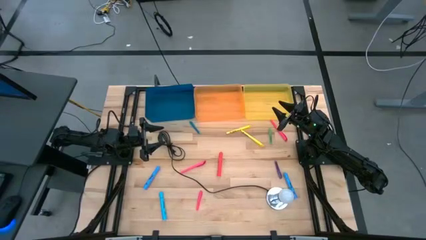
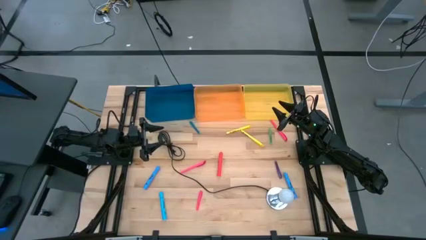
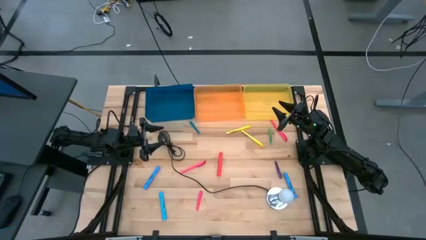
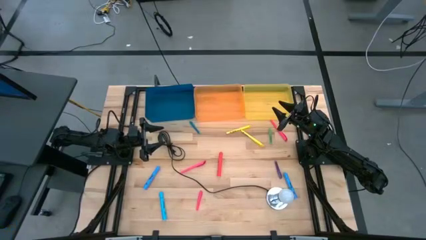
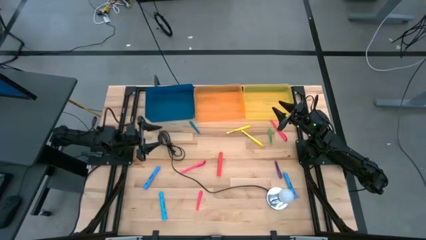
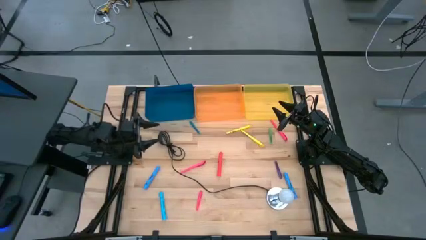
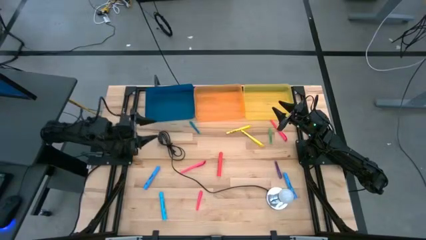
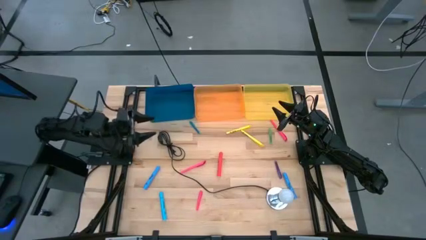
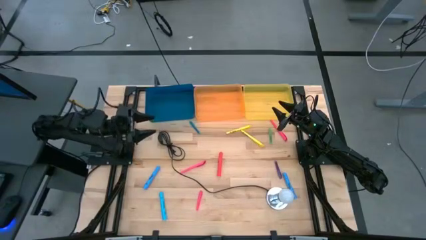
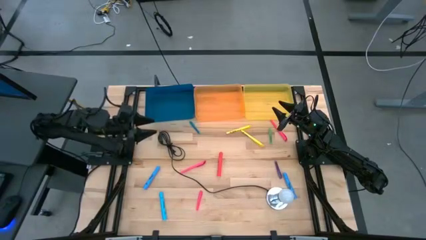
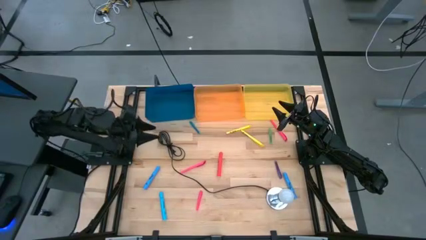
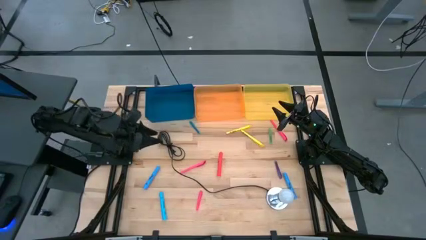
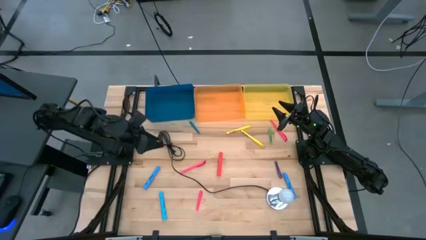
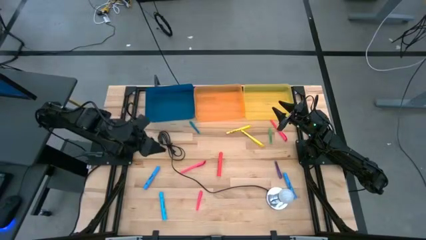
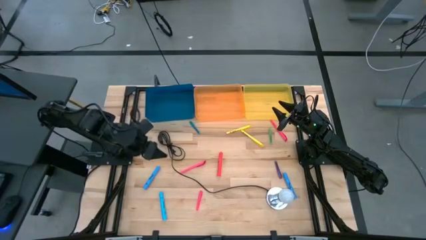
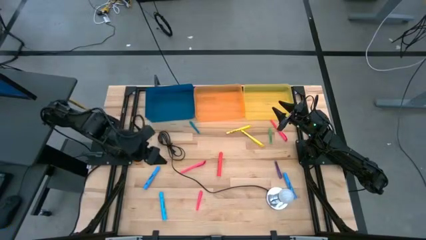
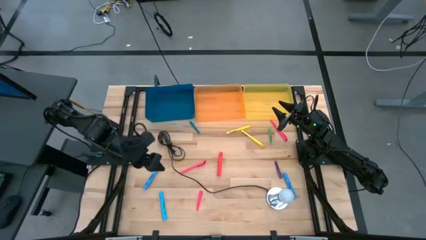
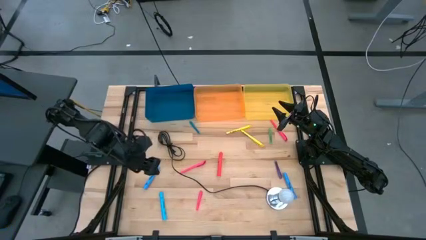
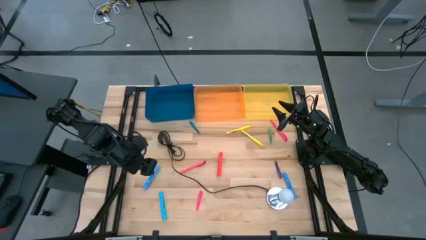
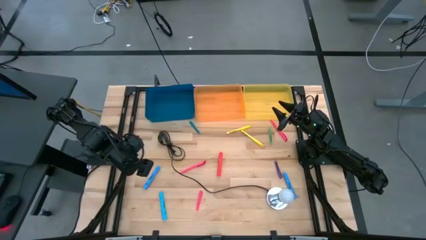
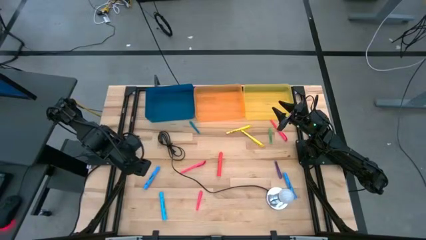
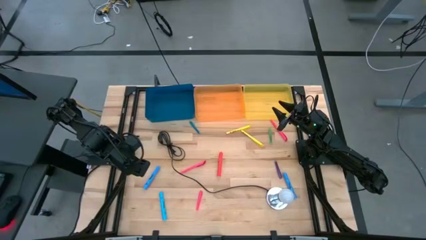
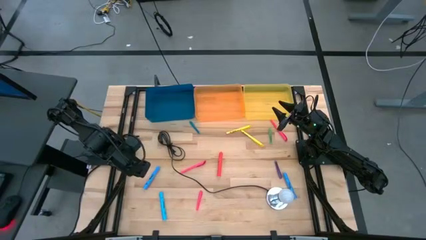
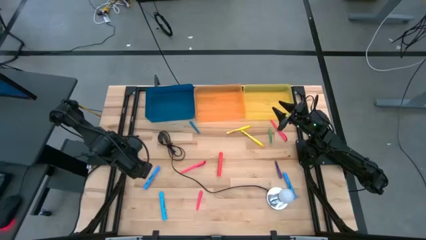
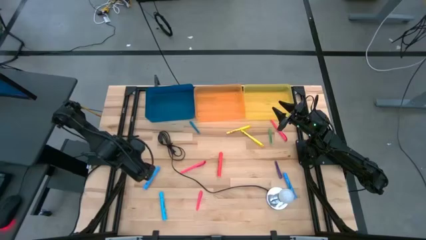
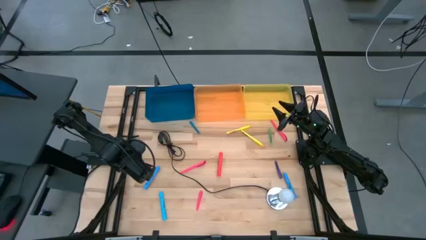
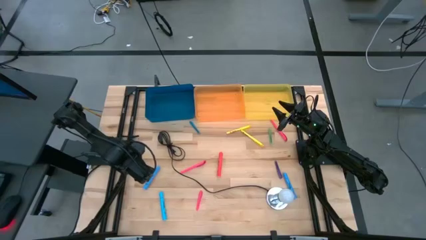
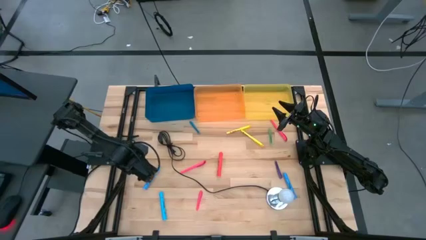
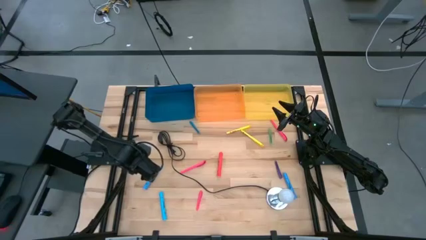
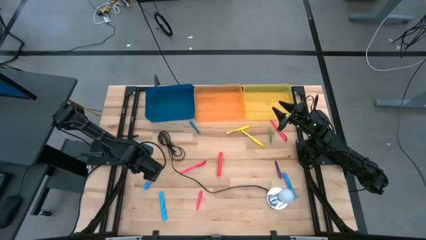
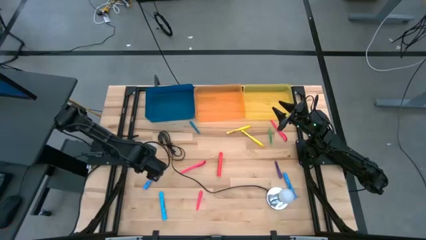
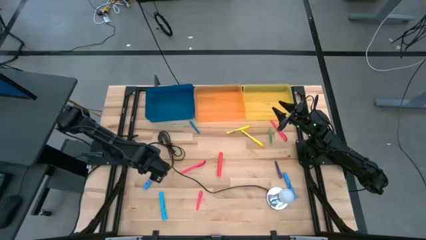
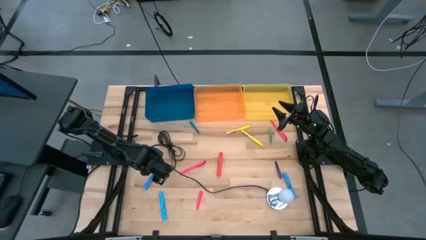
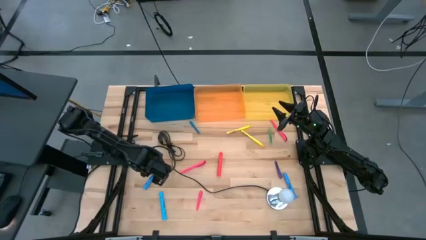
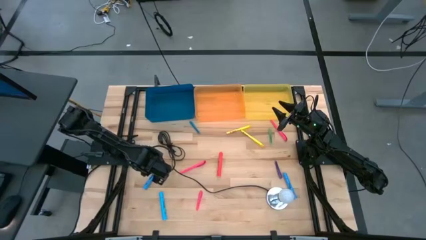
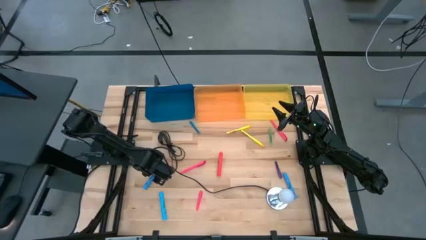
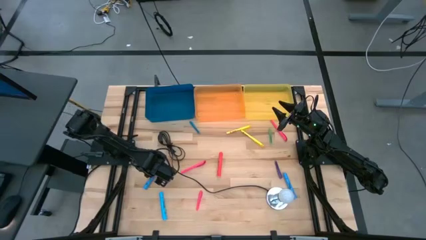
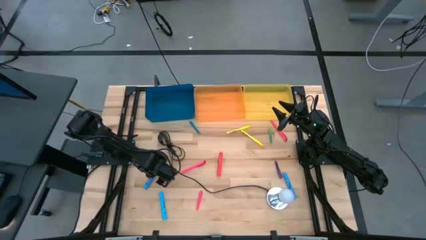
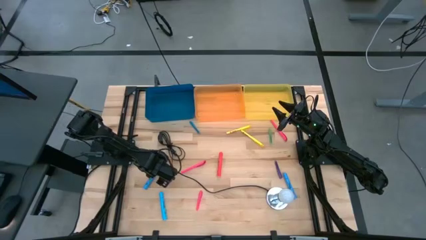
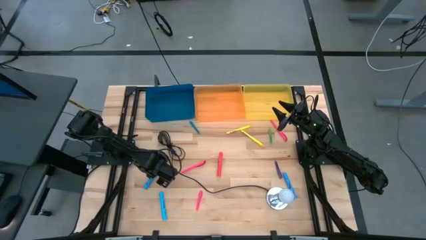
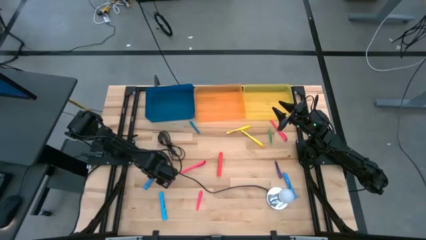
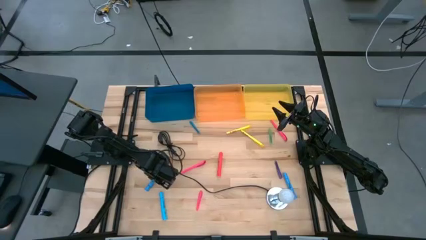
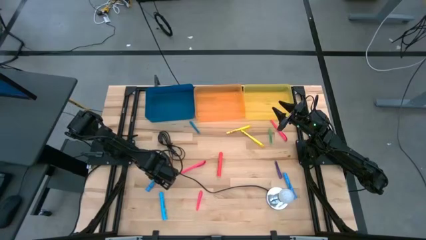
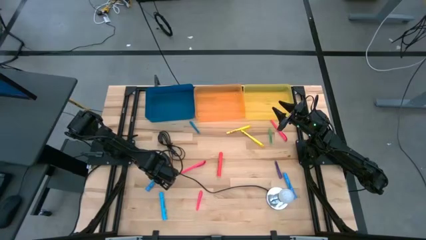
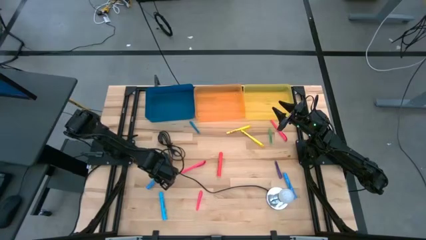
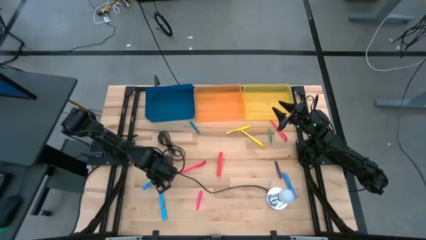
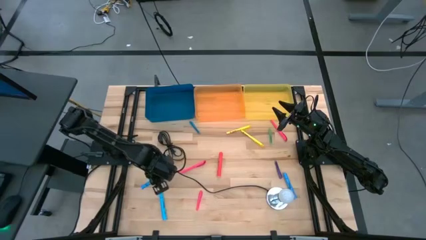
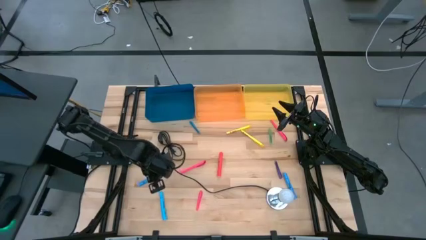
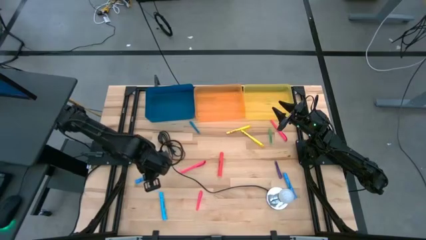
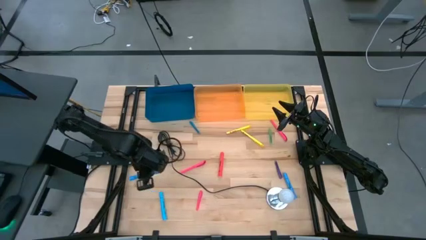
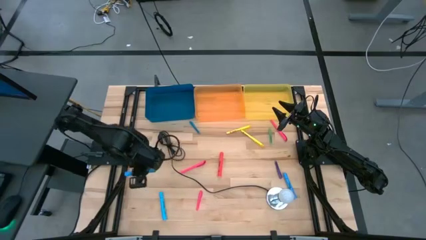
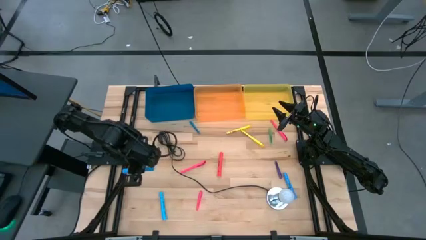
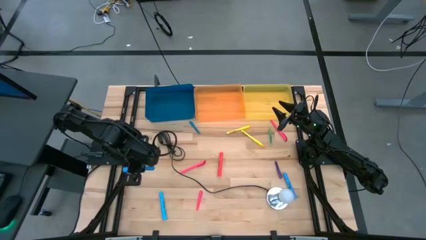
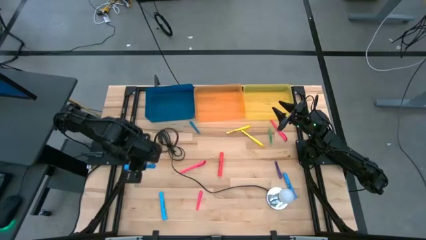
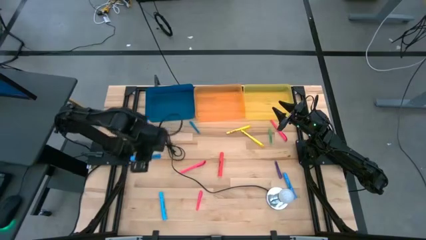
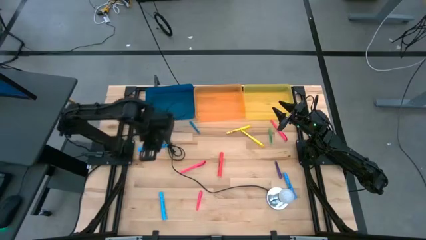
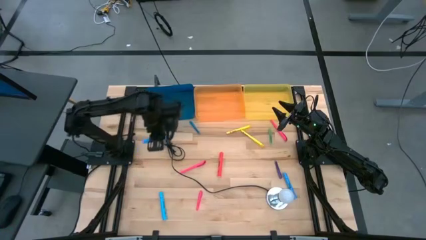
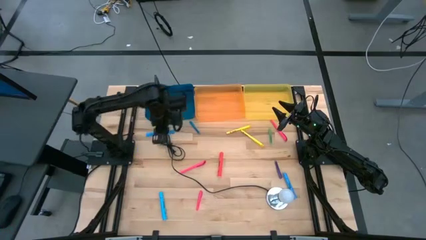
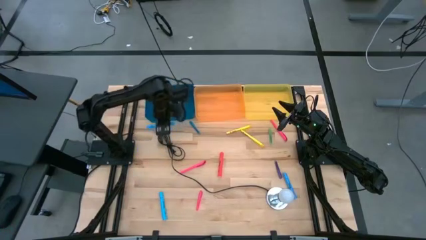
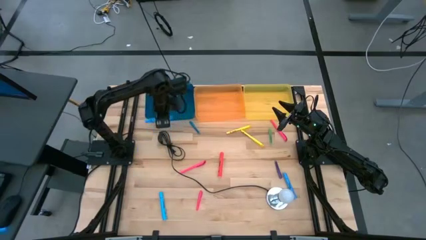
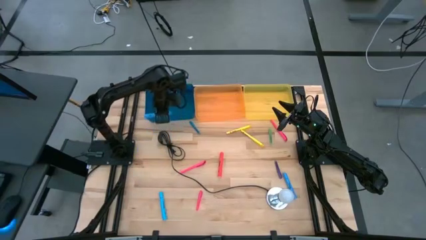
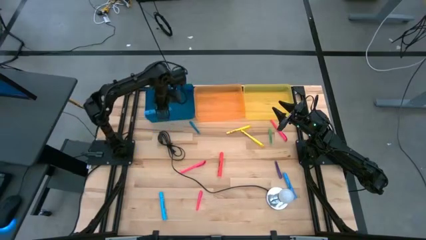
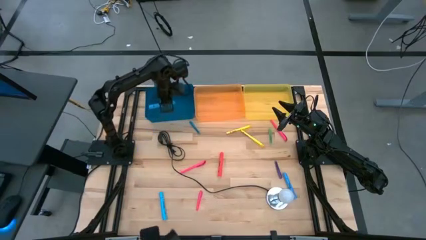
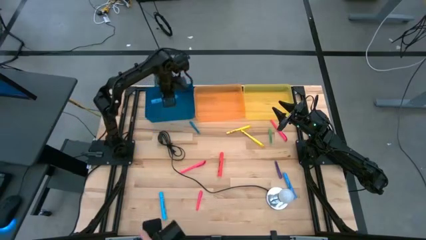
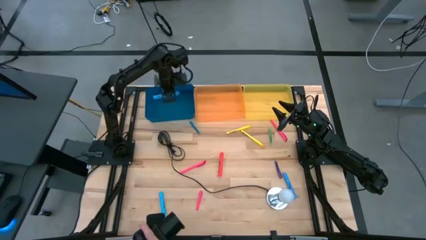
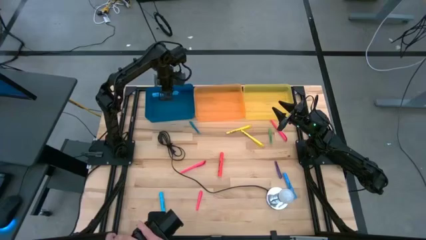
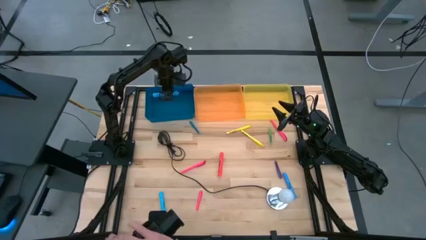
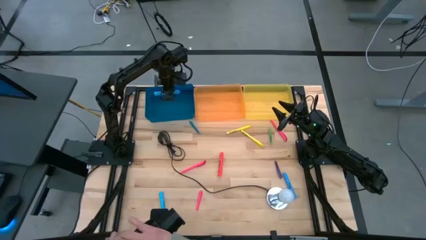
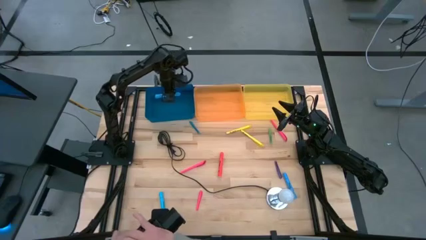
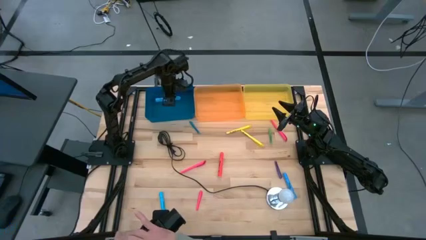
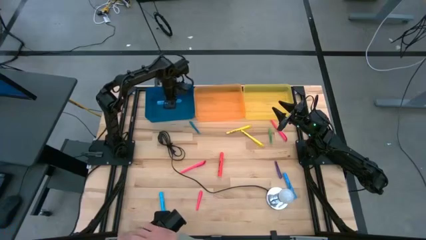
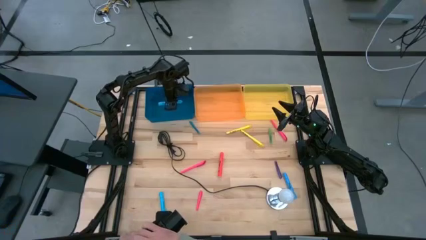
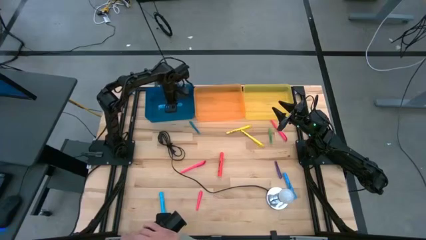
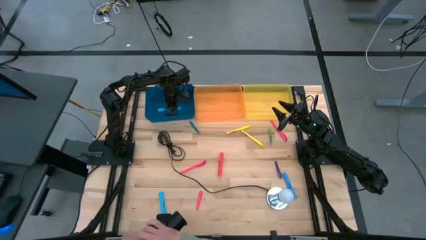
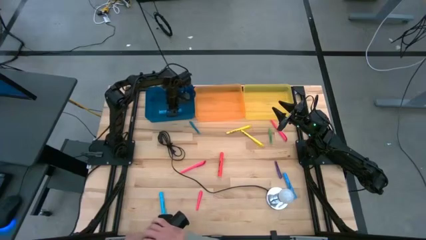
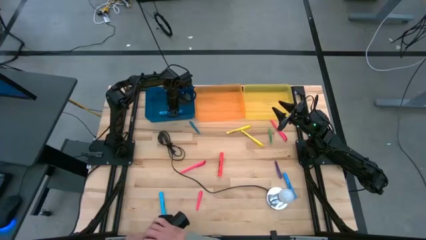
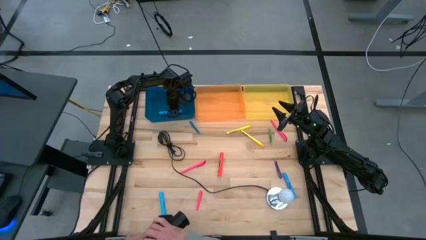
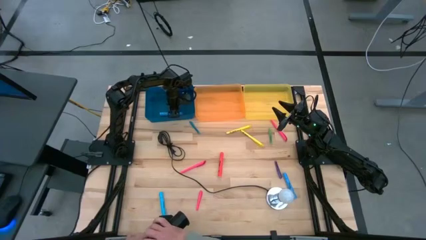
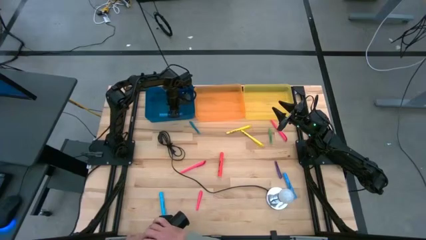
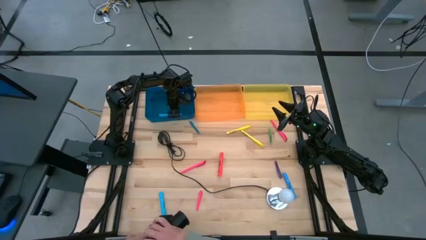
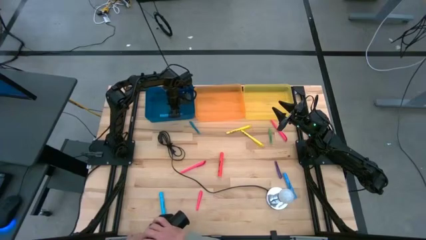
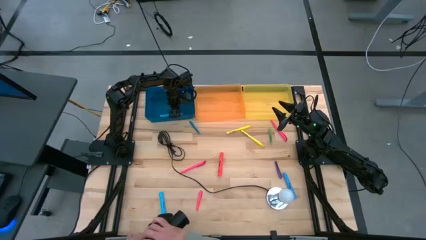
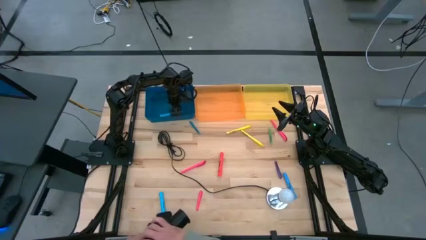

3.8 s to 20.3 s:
Task: Pick & Place Markers
Put the top left blue highlighter pen into the blue bin
